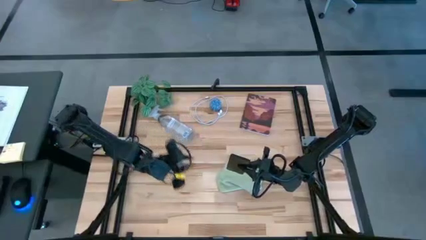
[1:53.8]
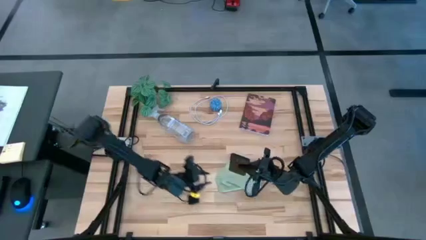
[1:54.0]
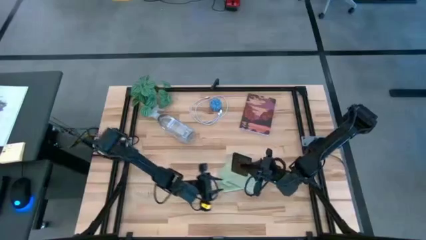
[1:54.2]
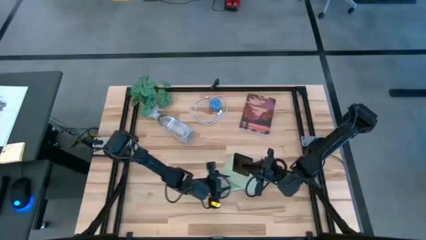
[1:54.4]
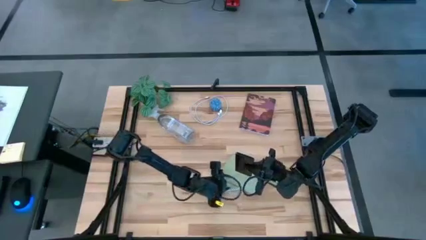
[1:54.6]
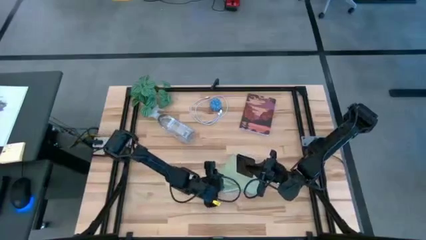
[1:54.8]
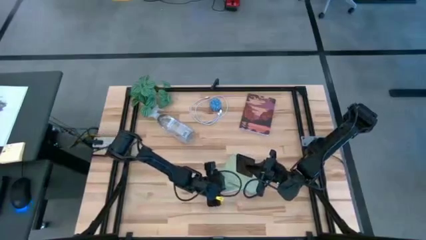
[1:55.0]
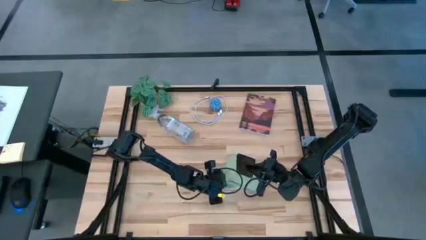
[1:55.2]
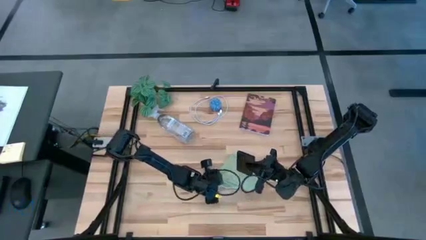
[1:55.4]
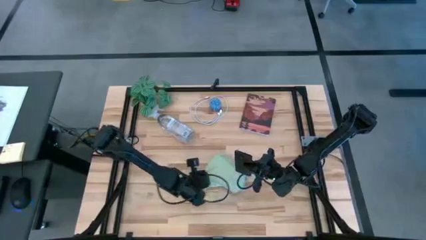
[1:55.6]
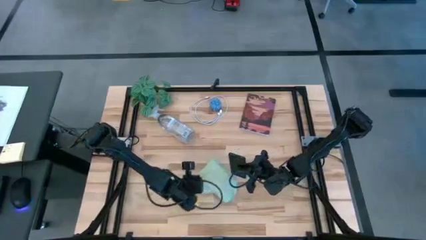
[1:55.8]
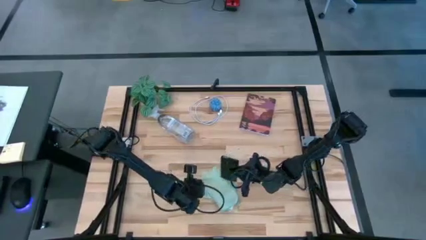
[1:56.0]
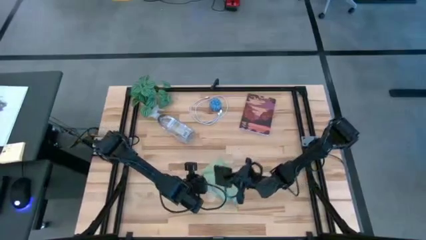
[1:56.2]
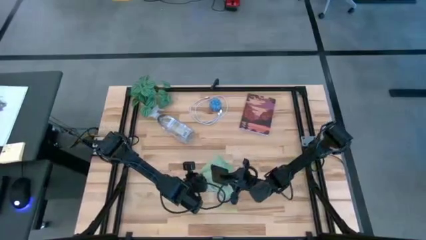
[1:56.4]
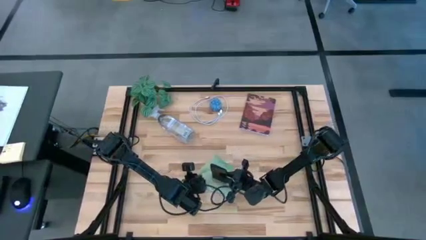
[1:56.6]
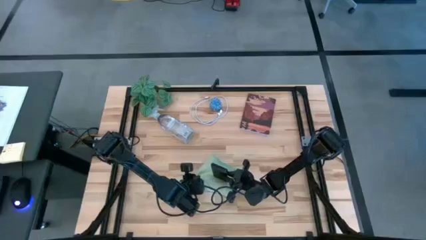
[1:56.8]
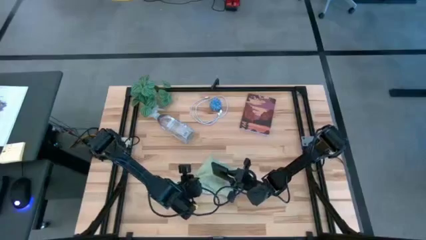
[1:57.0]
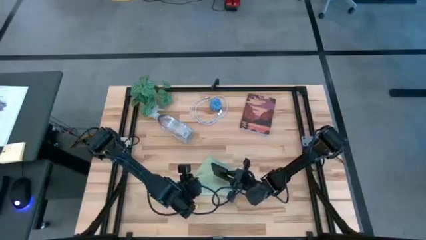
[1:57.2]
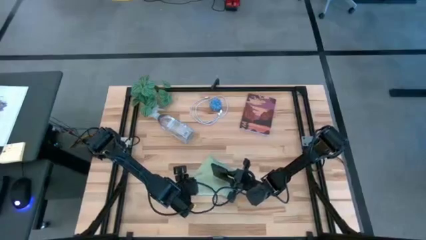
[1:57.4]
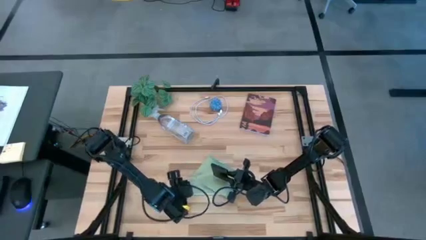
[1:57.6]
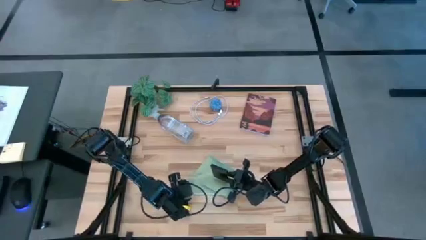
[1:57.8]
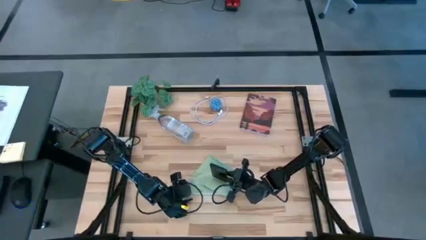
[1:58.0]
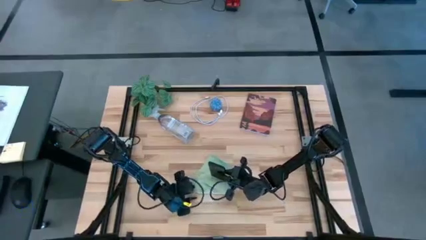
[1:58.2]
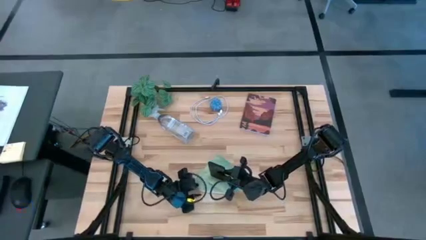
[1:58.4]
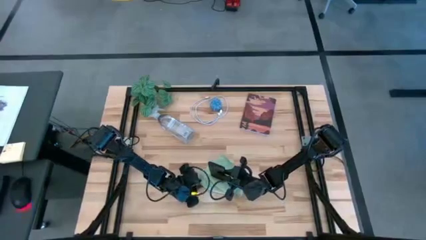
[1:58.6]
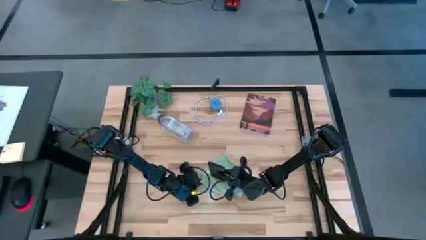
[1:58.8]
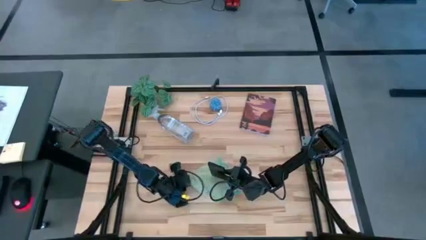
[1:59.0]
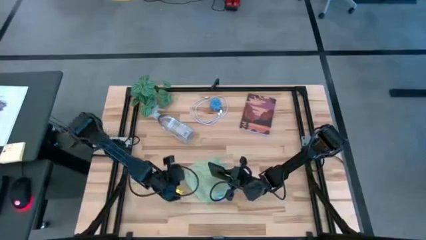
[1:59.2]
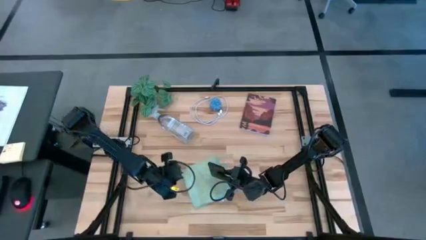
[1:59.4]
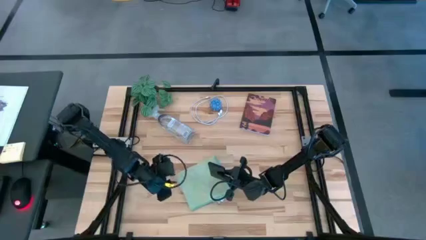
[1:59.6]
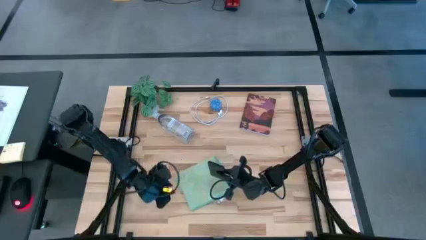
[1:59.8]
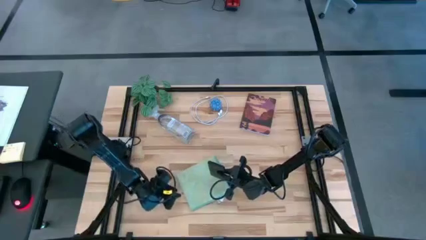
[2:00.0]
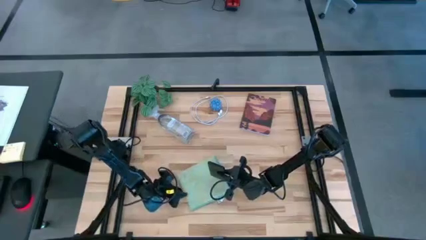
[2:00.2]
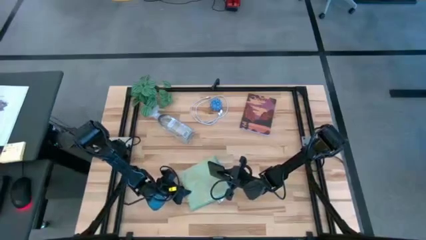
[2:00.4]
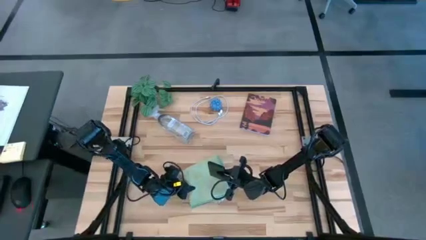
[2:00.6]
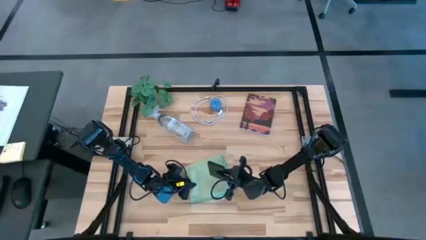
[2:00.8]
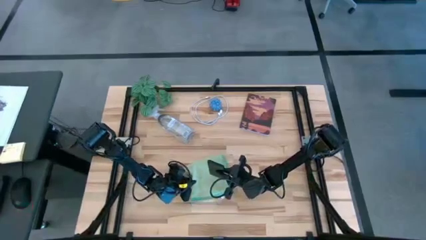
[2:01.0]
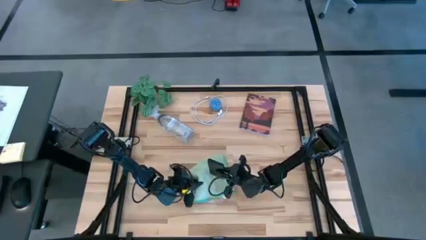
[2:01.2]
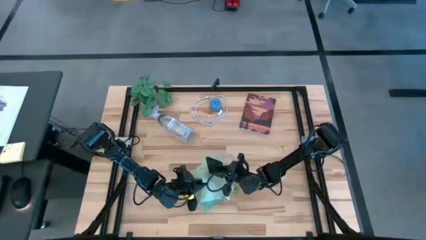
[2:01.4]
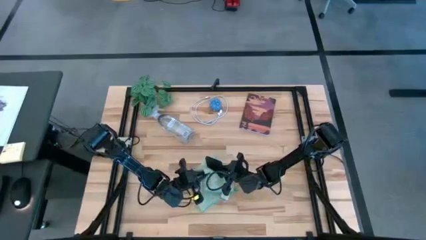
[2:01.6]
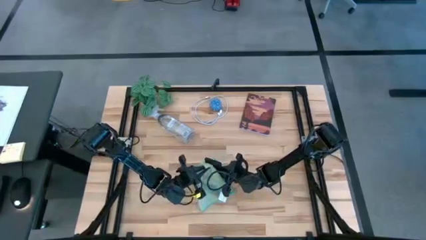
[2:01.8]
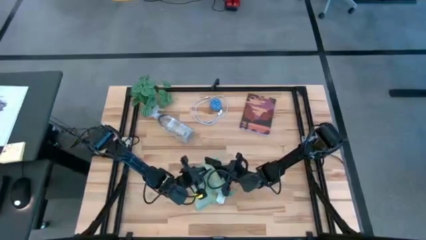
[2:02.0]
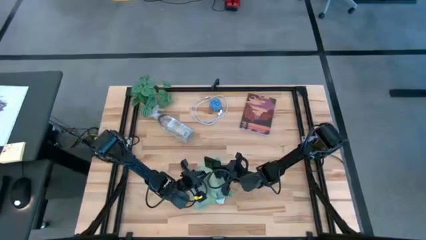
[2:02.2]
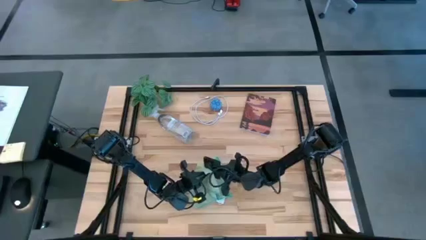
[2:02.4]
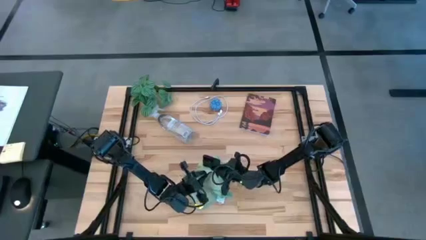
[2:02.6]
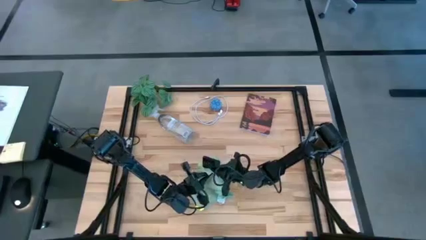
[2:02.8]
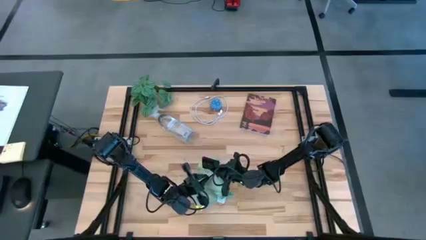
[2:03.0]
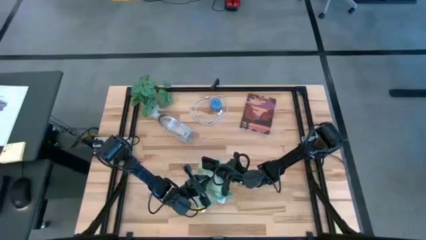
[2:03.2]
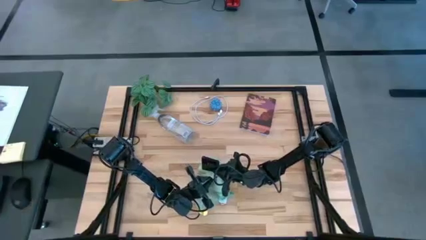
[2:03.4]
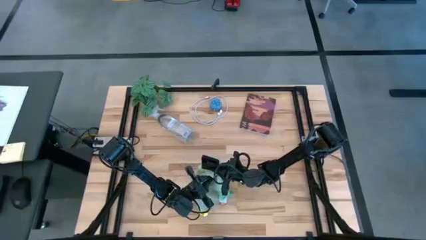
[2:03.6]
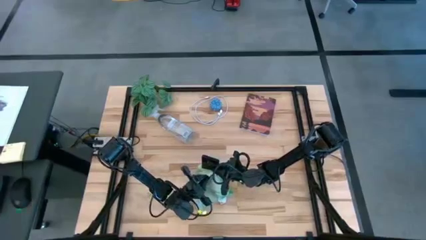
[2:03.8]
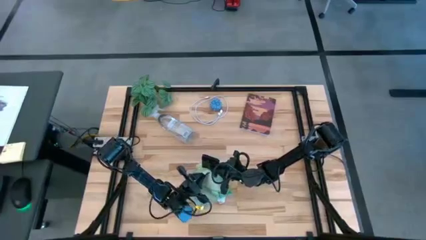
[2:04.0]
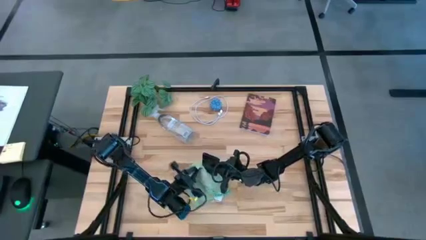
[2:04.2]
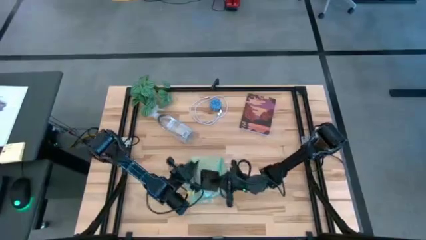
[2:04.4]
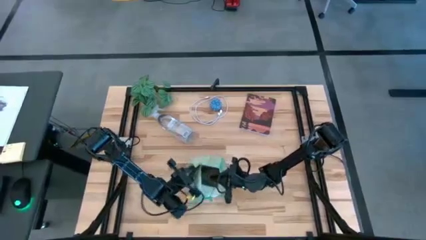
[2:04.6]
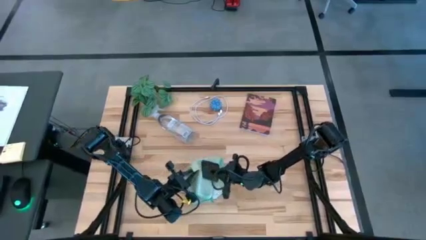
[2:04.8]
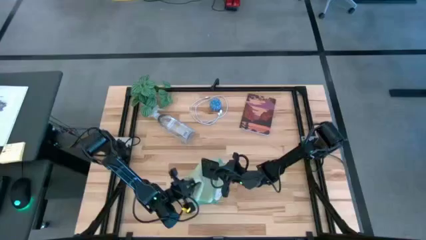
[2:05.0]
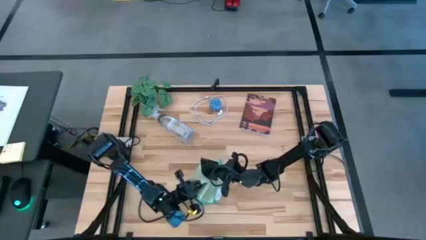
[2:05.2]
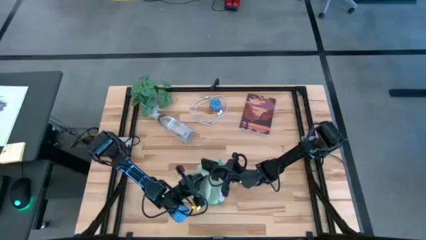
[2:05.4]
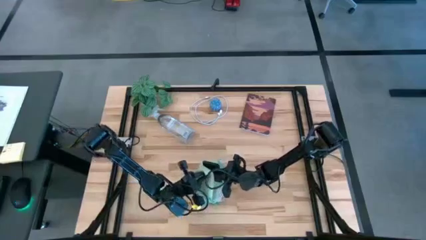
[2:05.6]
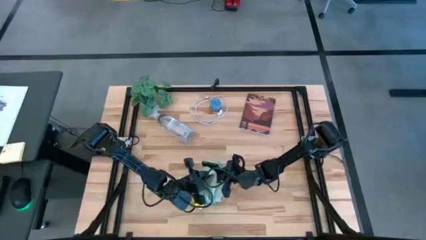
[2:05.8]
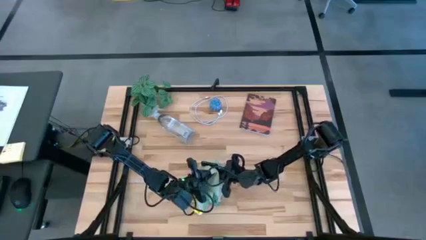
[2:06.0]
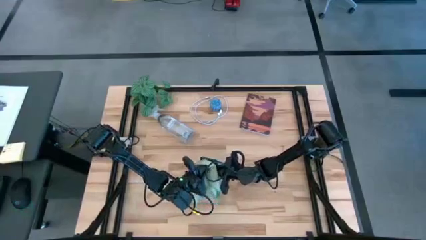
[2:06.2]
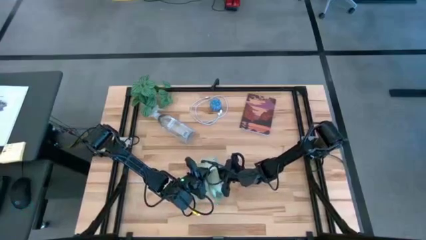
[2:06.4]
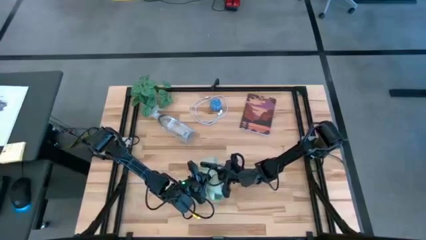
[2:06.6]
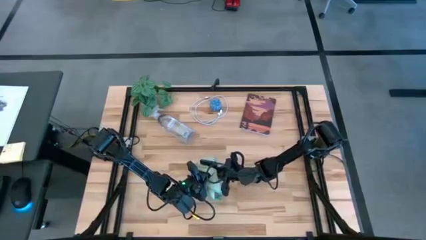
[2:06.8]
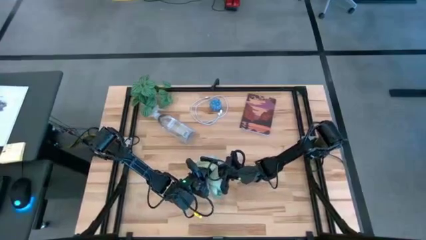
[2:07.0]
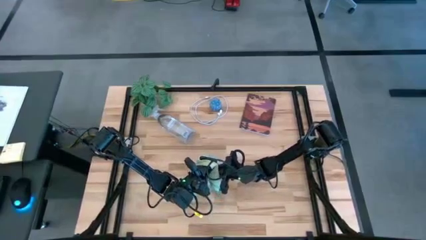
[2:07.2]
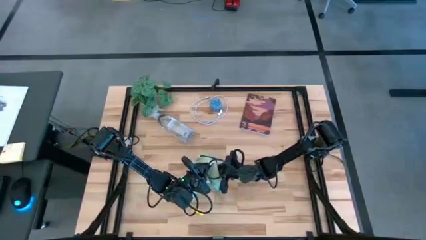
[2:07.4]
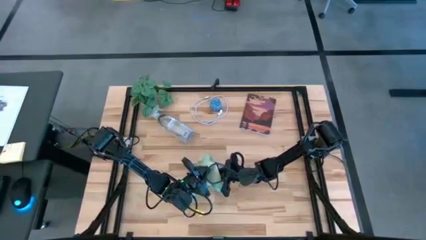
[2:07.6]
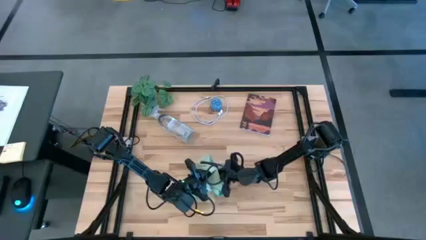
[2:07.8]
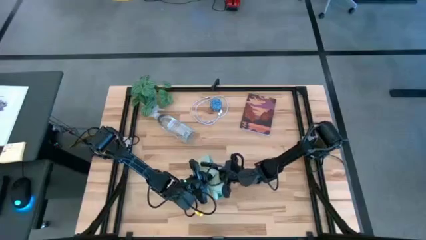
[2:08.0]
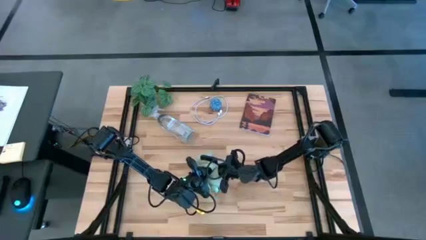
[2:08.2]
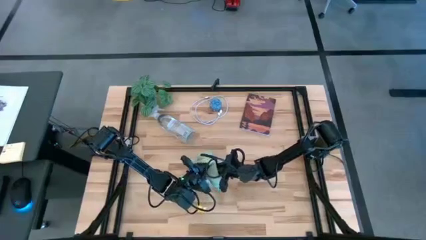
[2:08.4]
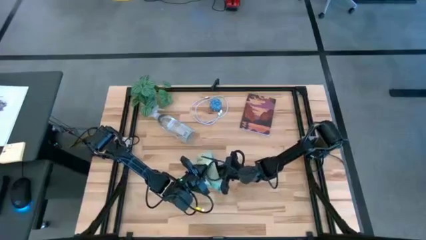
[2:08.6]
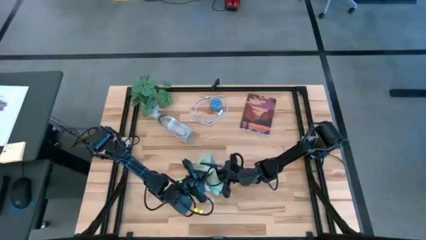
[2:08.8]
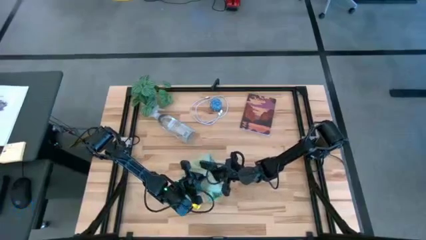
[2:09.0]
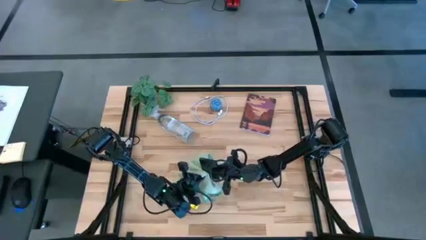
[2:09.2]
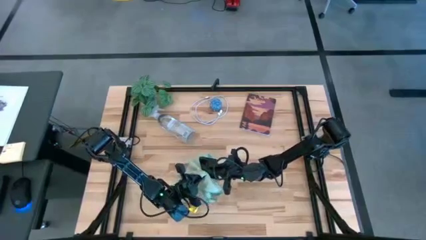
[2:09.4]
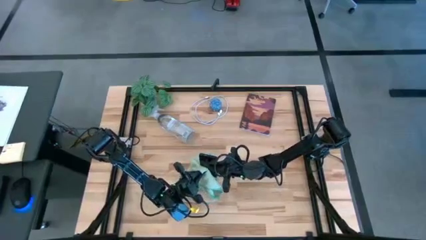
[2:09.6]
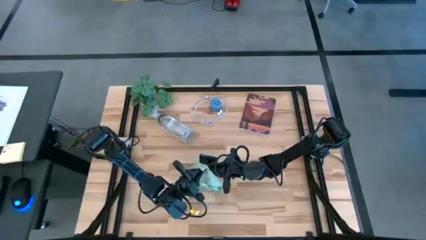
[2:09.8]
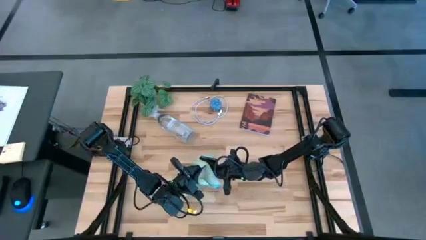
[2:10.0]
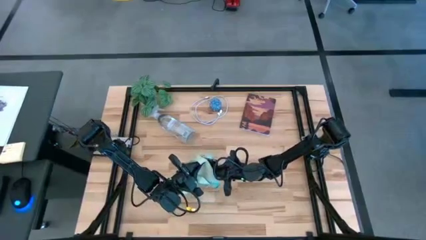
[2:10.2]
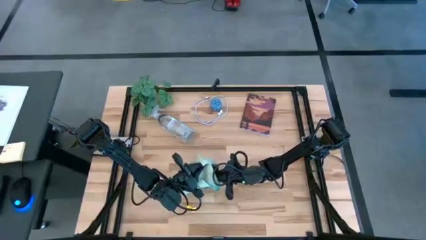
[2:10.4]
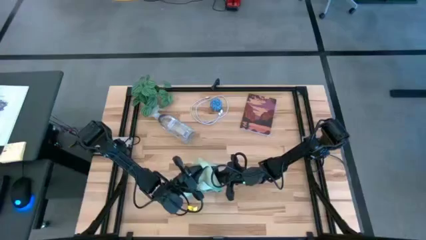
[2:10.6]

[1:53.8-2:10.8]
Task: Apply microfiber cloth
Wipe the back and front of the black cellphone with the green microfiber cloth
